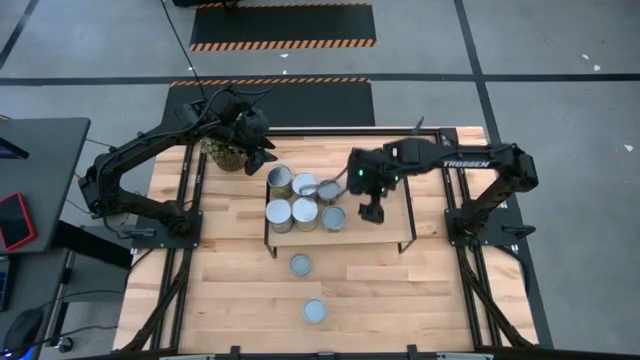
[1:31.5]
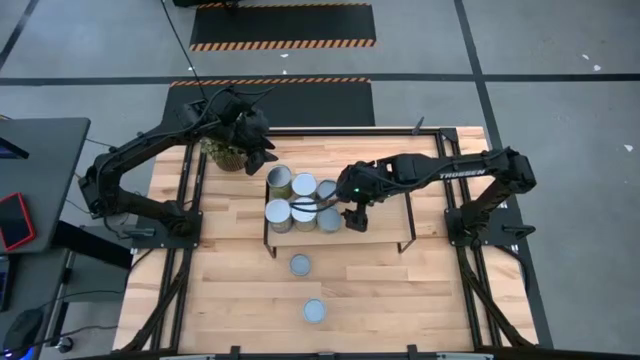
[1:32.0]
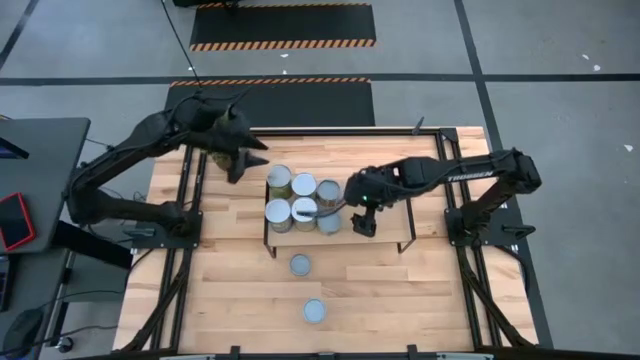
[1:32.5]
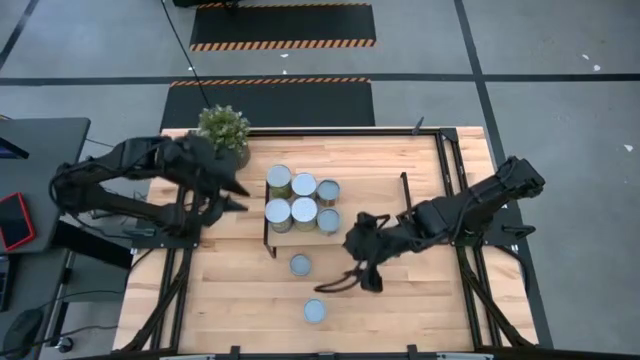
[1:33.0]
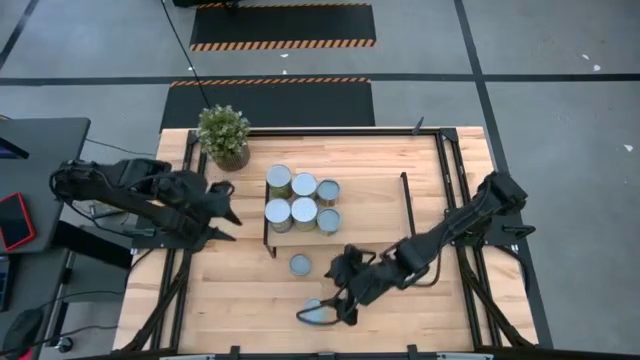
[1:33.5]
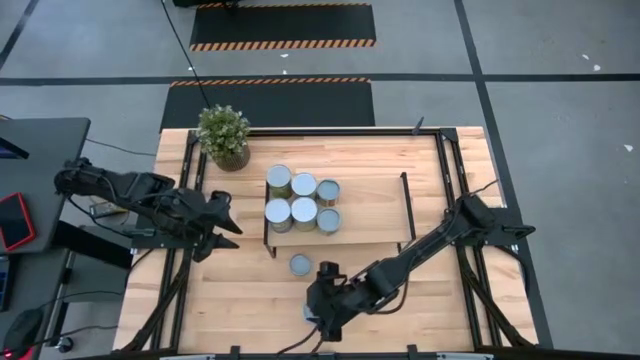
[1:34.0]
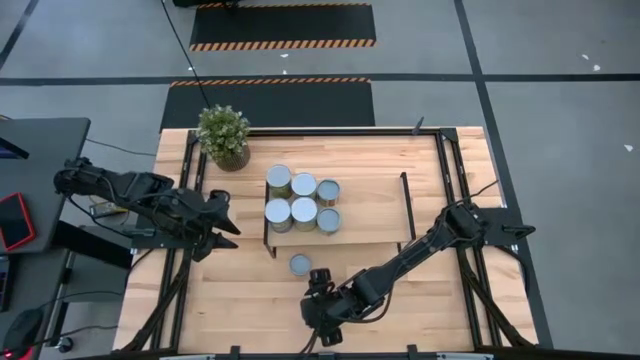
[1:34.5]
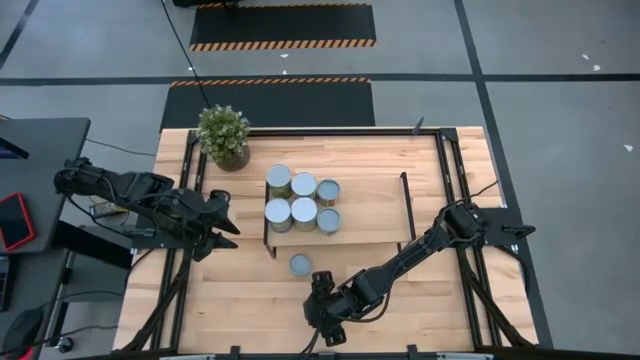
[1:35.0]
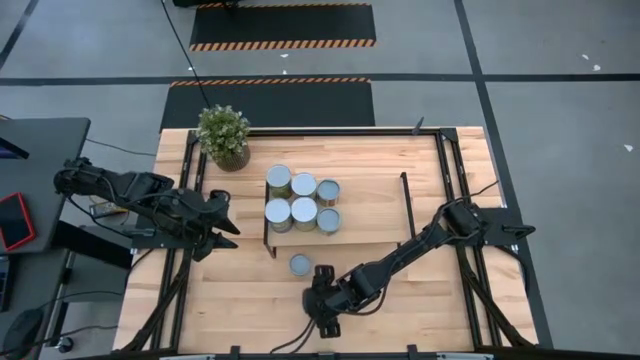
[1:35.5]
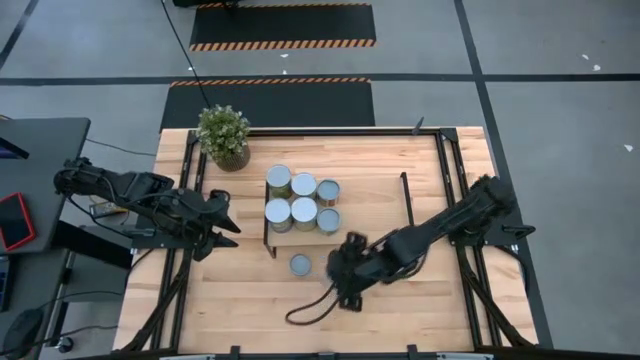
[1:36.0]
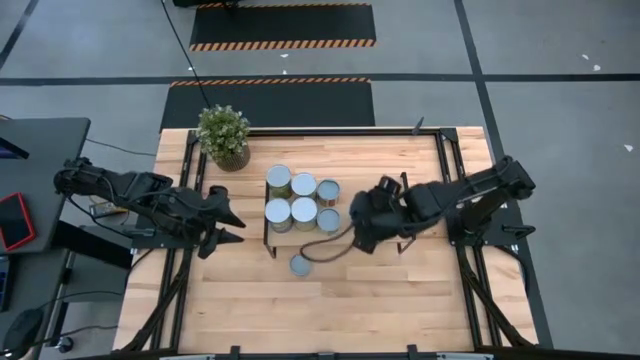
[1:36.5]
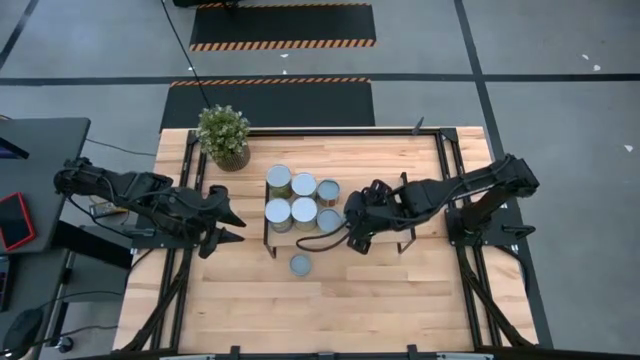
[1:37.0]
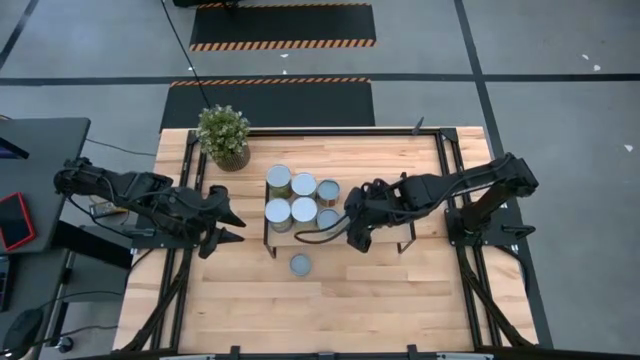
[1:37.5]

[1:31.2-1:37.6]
Task: Pick and place cans onto a shelf
Put the canned mixed vegetables on the shelf

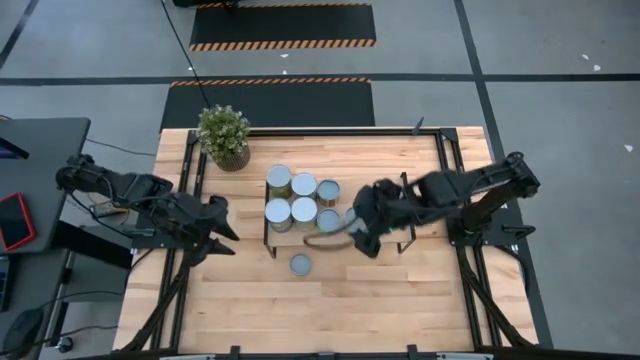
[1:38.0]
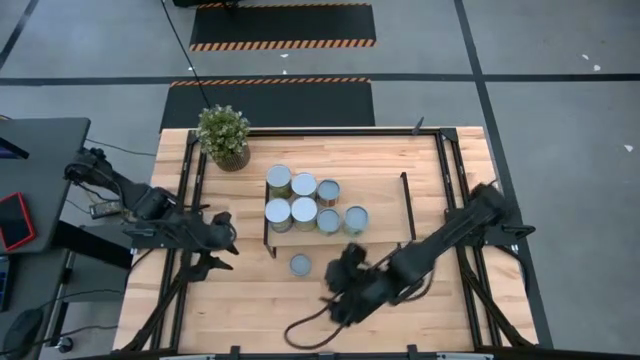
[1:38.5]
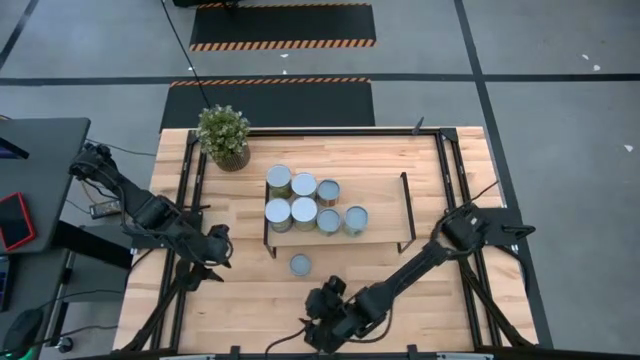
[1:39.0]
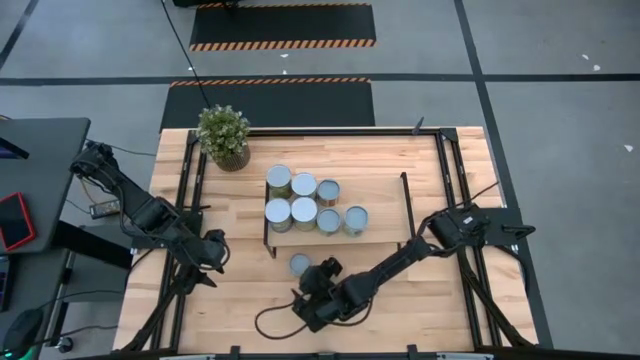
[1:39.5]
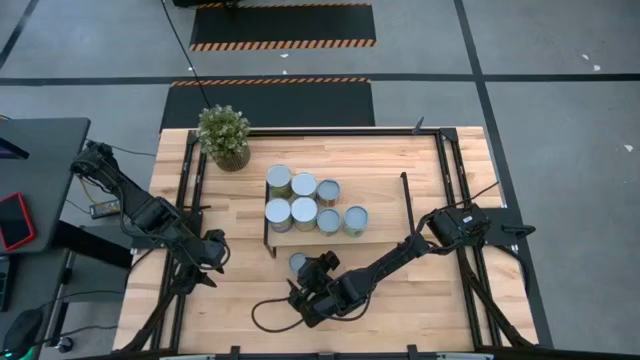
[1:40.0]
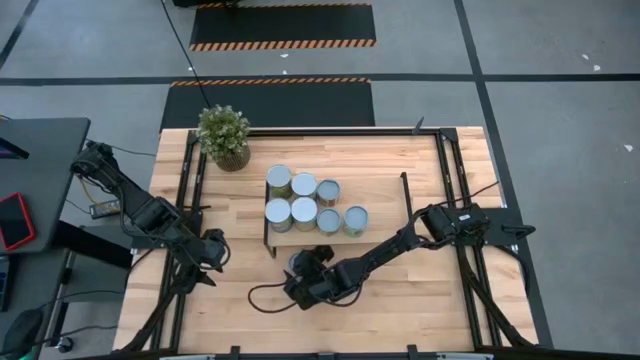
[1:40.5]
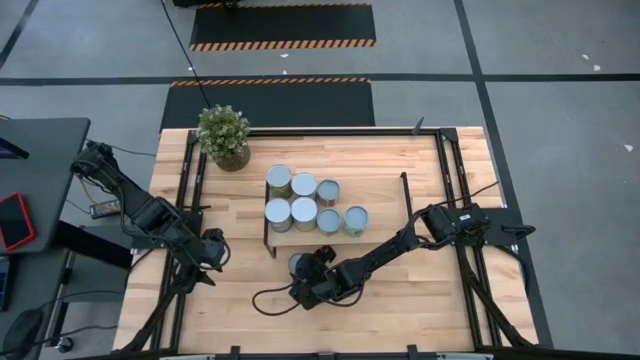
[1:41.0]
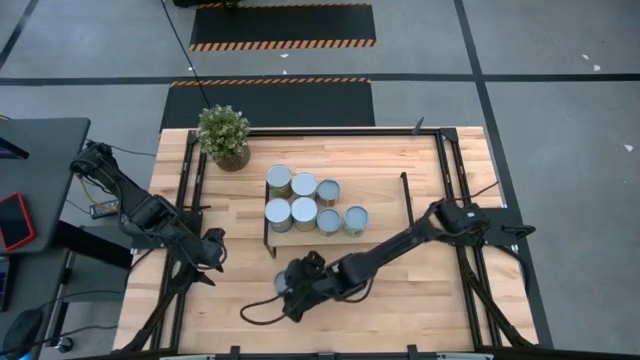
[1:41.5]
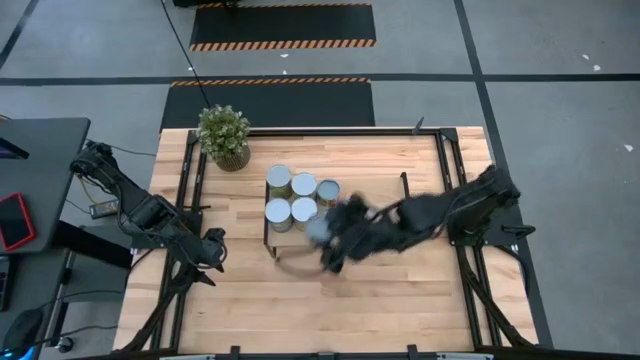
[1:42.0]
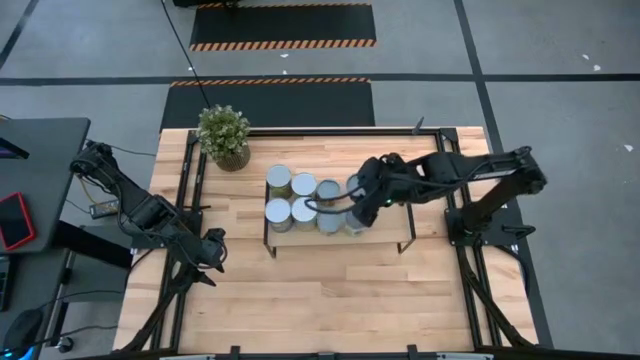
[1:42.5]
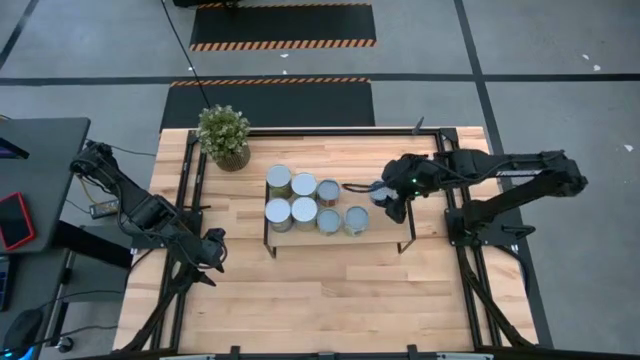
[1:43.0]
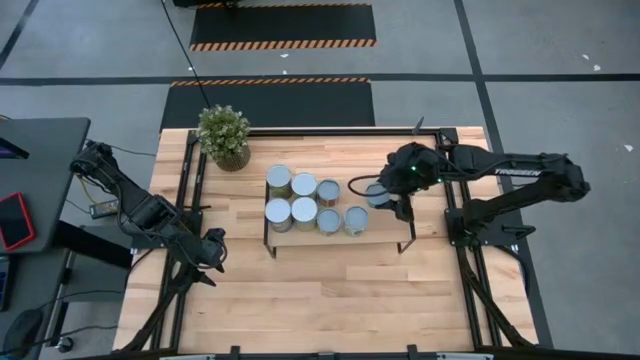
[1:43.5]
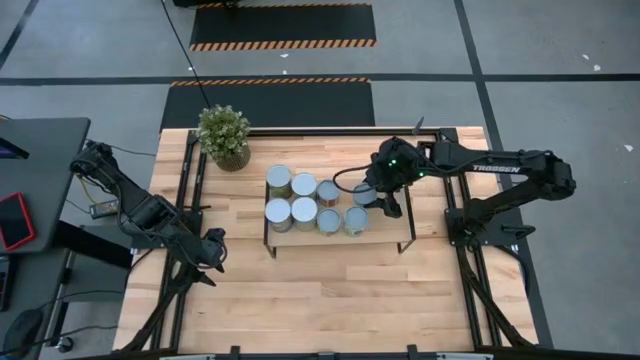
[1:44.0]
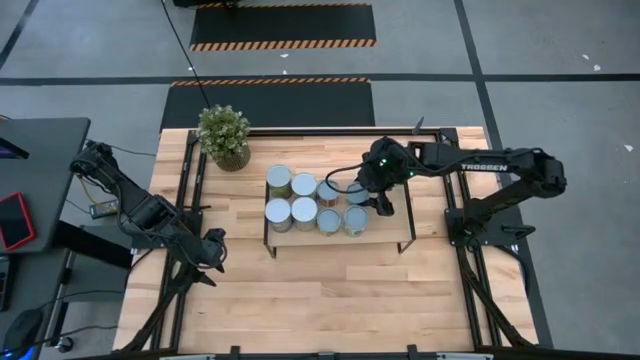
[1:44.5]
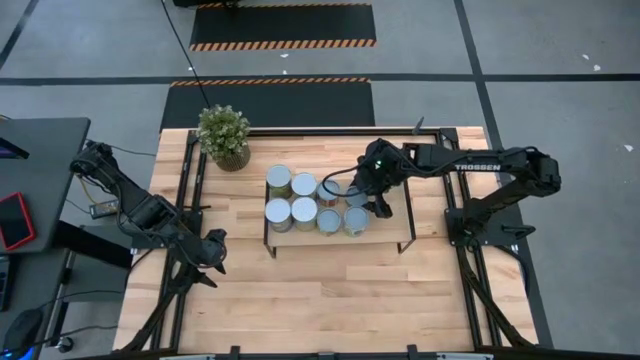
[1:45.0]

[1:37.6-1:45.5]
Put the canned tuna on the shelf

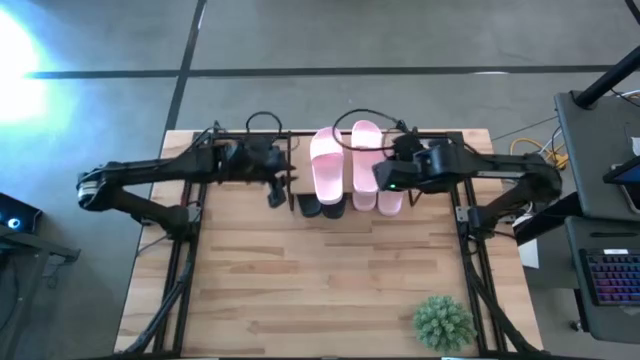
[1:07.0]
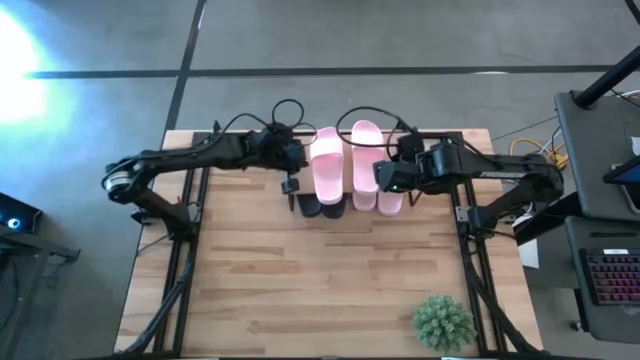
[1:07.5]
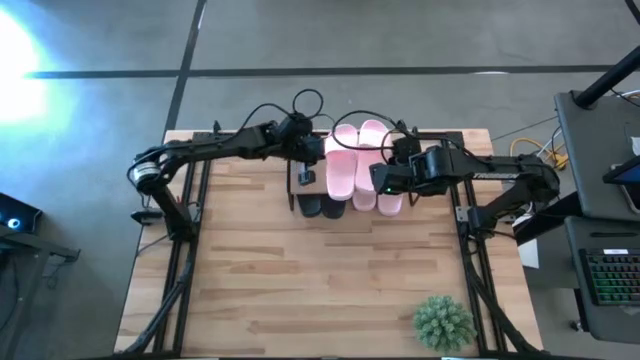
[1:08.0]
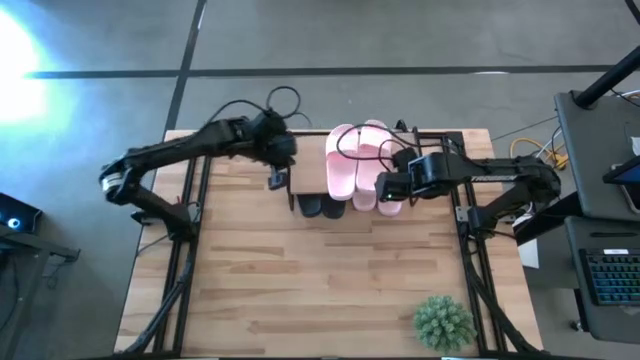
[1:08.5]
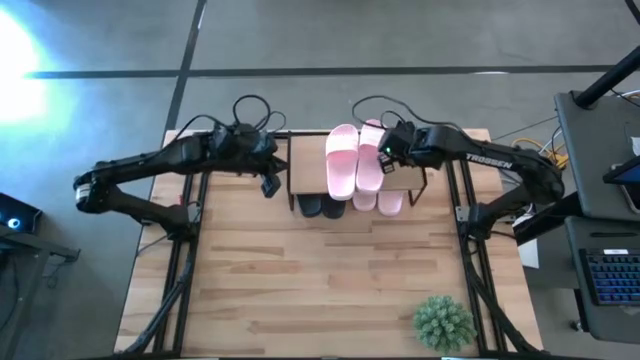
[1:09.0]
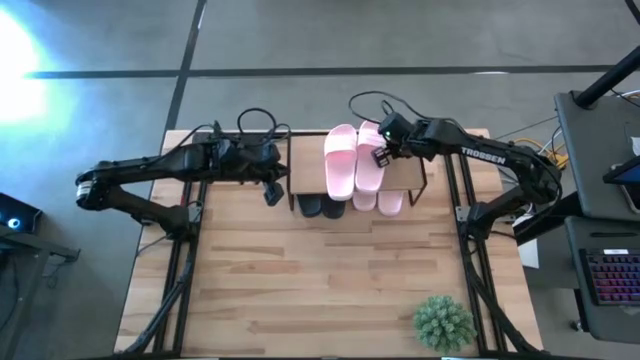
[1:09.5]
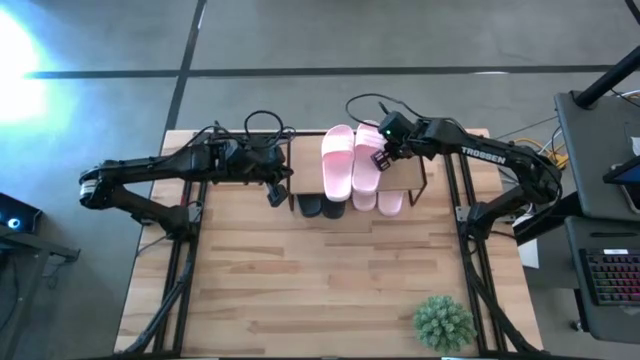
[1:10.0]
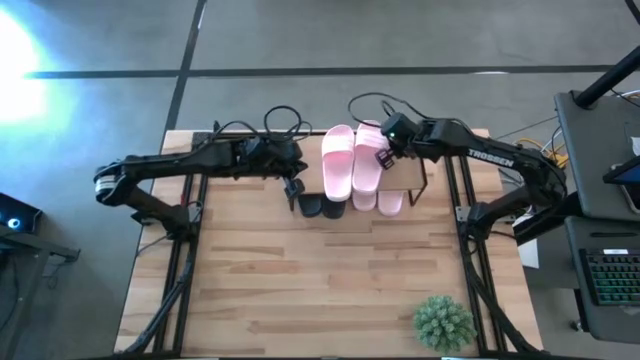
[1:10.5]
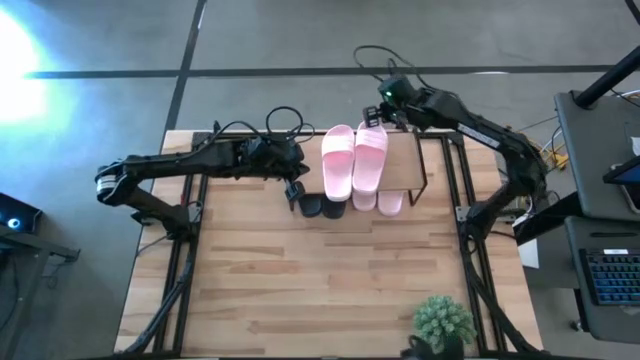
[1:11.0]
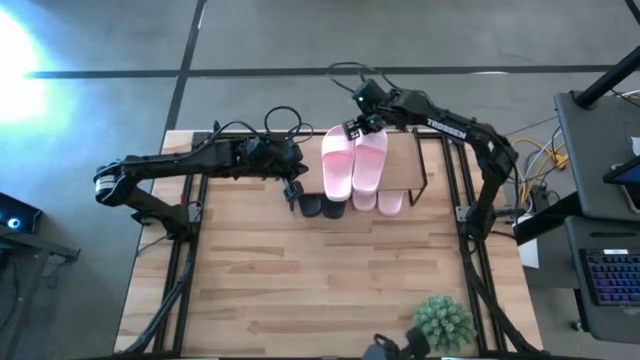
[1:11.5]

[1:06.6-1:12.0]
Task: Pick and place slides into the shelf
Adjust the pink slides on the shelf

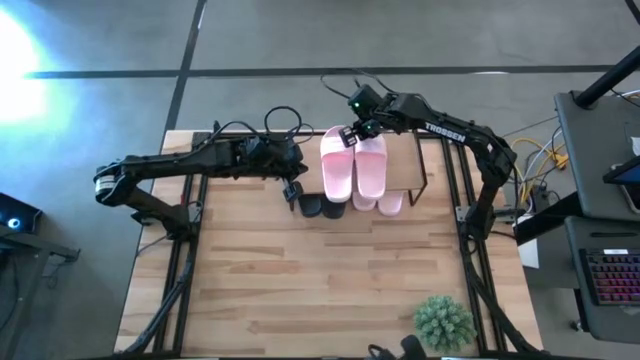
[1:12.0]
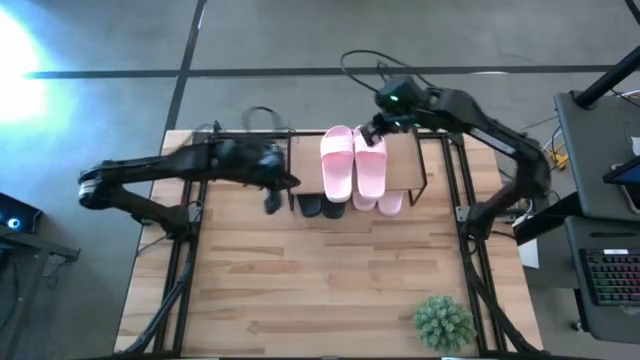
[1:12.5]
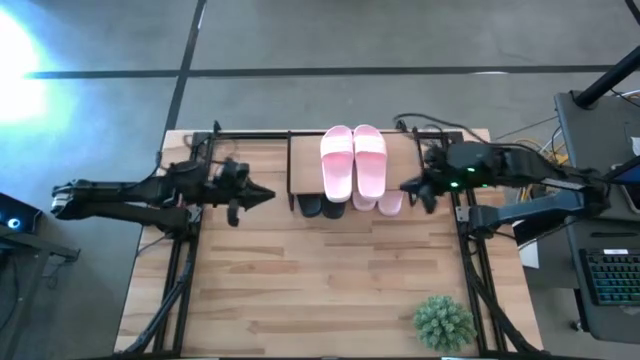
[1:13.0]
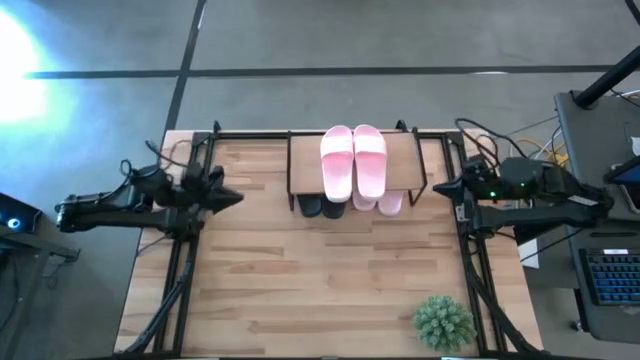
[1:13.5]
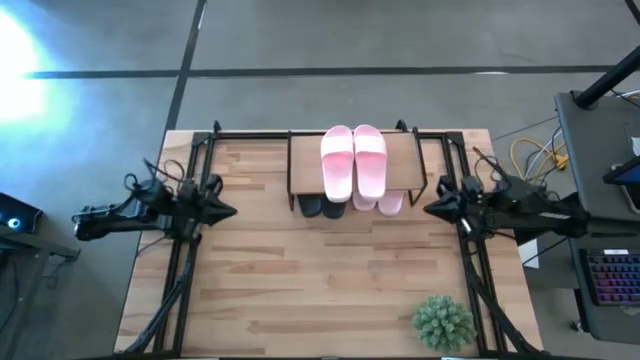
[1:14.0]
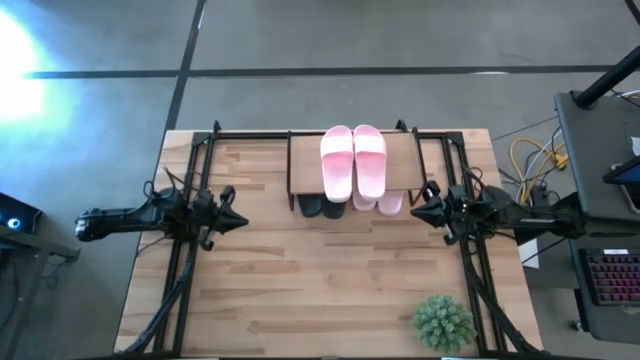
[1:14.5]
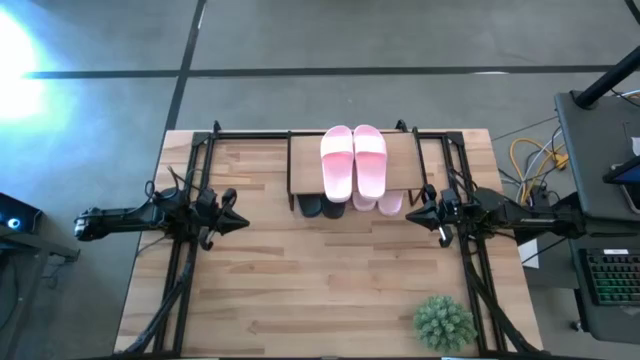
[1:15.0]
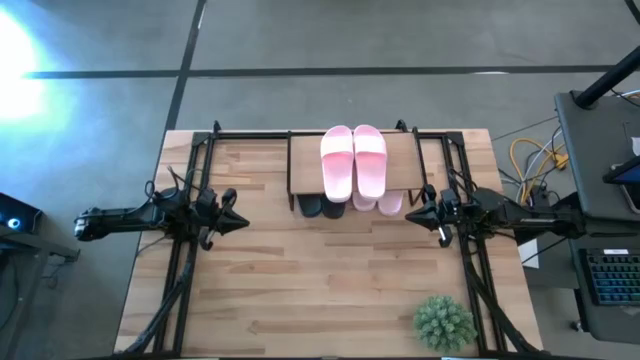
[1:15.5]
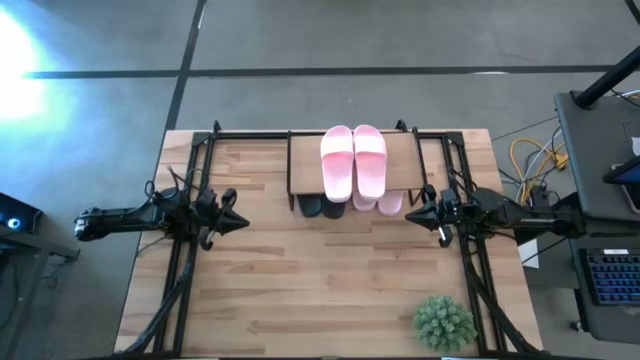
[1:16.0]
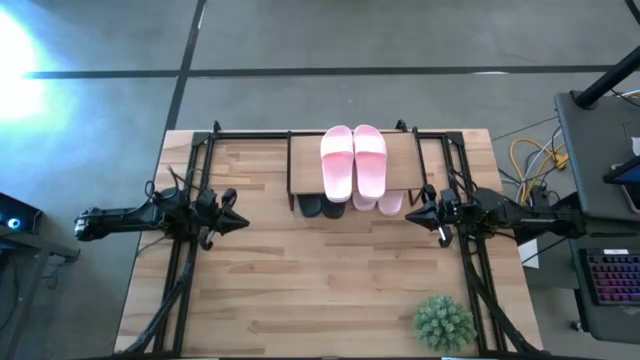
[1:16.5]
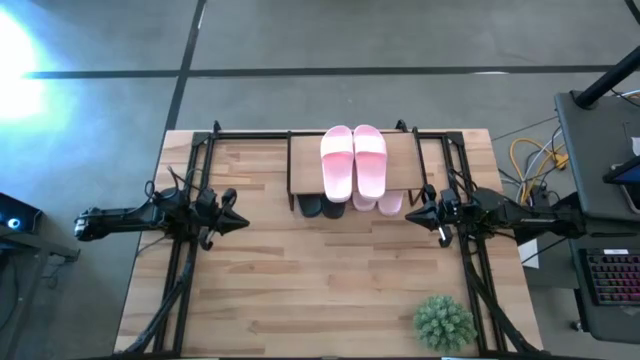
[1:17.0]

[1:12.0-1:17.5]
Return to Home Position
